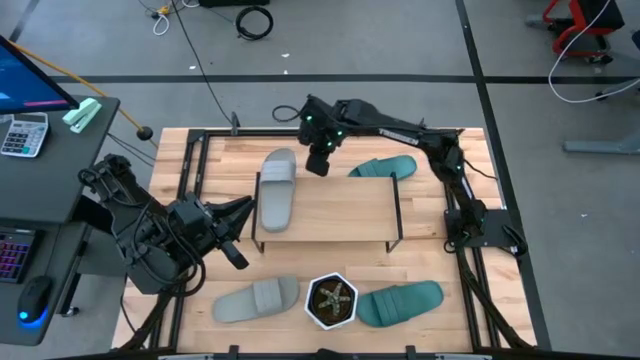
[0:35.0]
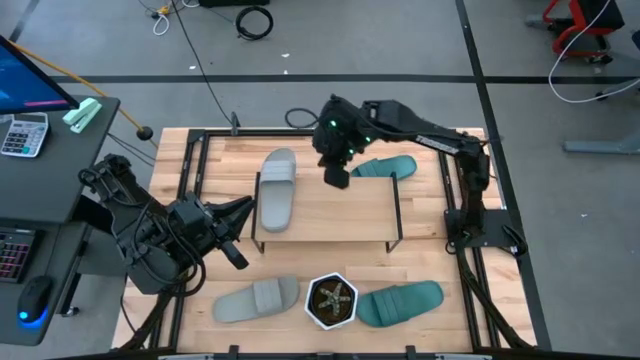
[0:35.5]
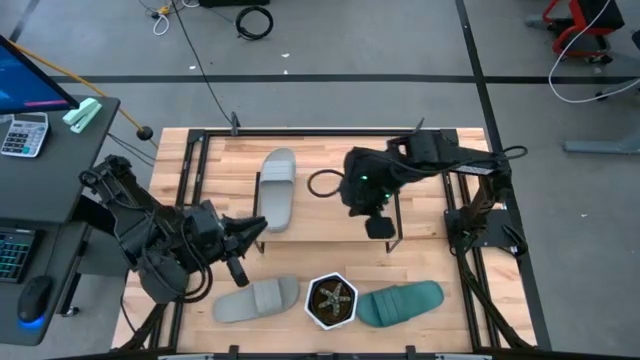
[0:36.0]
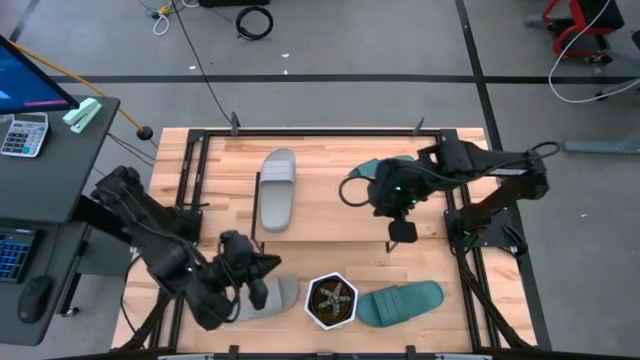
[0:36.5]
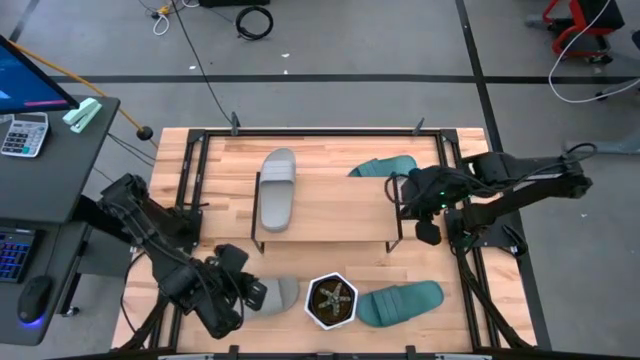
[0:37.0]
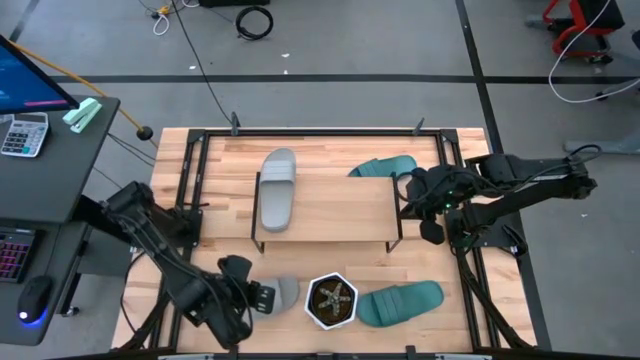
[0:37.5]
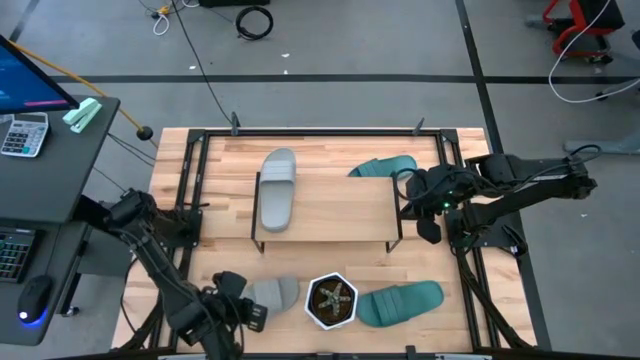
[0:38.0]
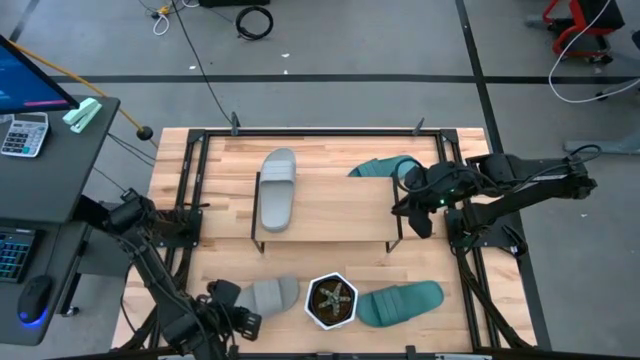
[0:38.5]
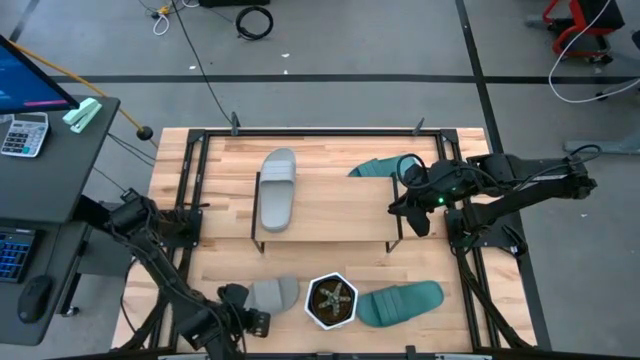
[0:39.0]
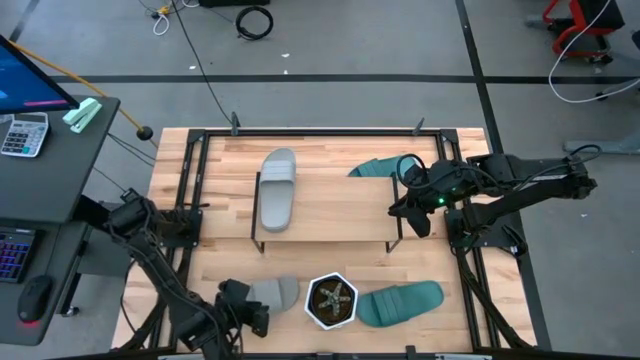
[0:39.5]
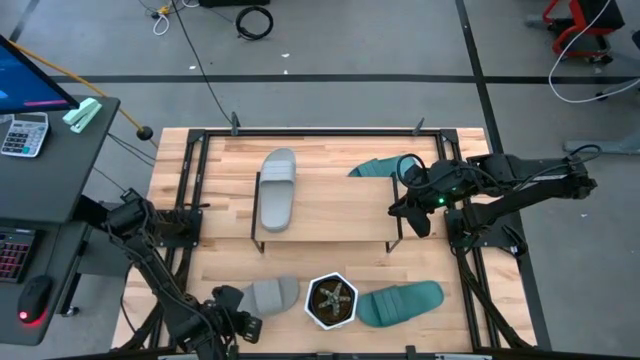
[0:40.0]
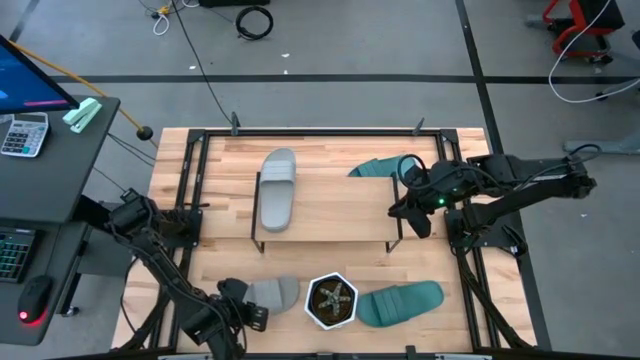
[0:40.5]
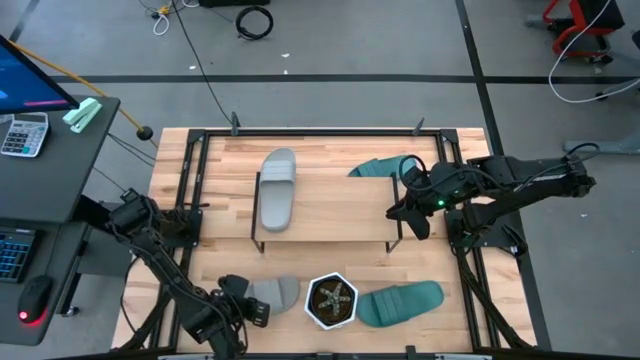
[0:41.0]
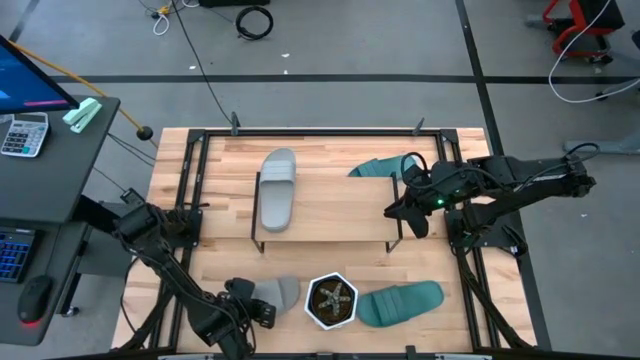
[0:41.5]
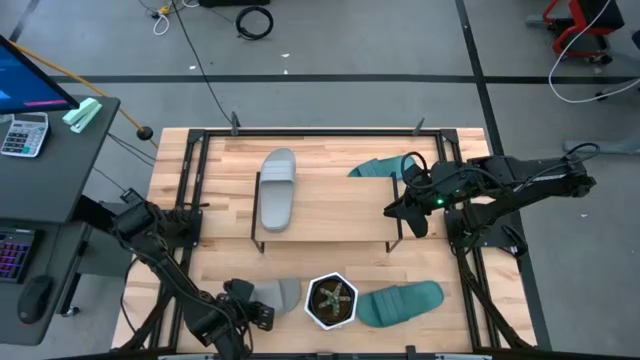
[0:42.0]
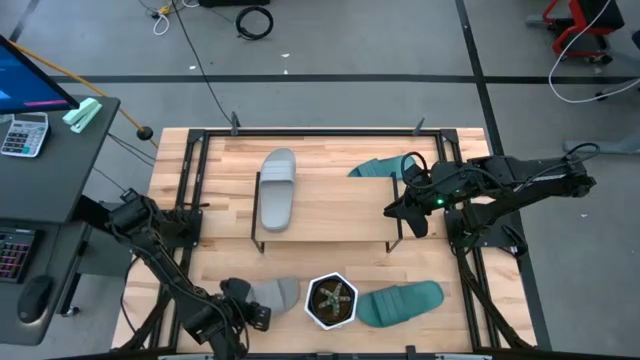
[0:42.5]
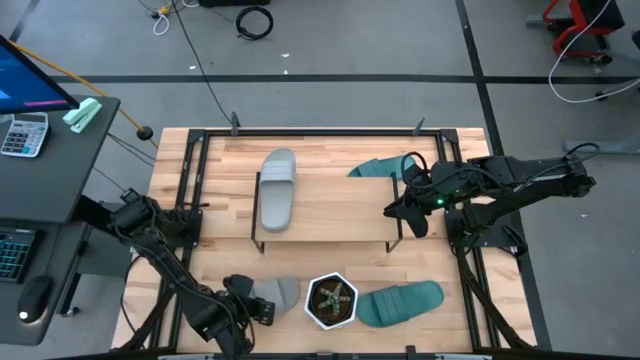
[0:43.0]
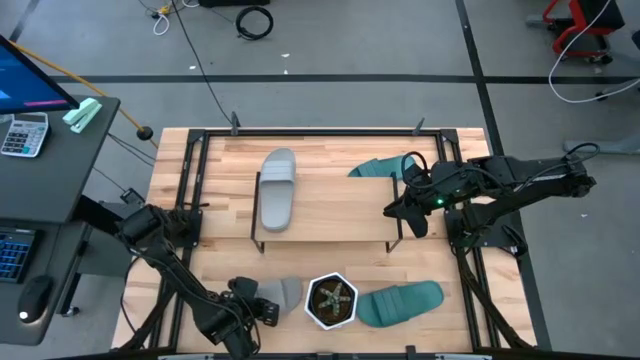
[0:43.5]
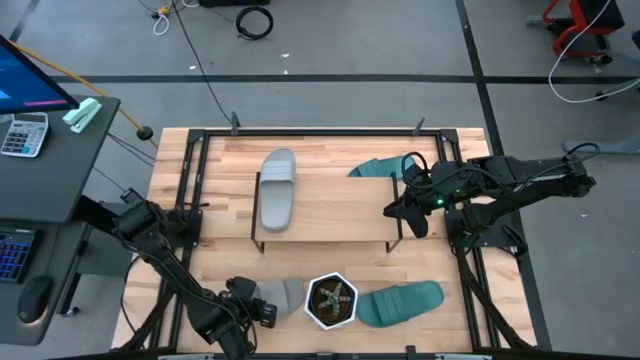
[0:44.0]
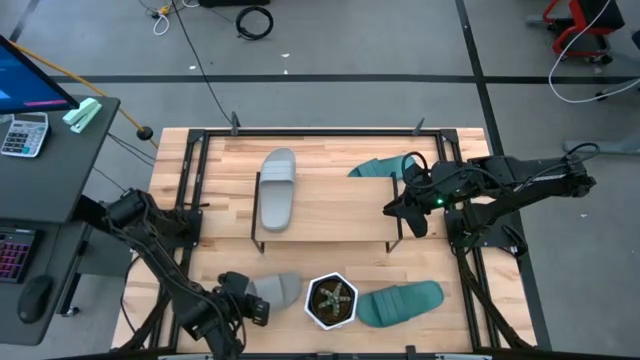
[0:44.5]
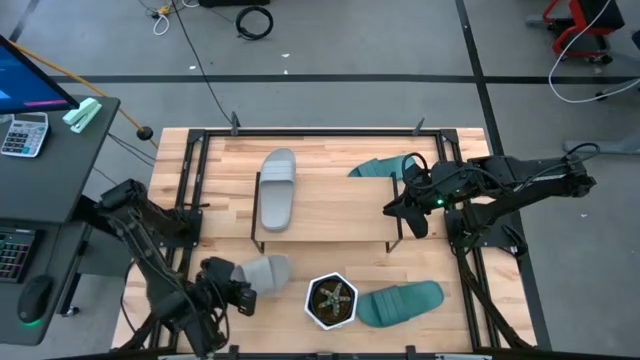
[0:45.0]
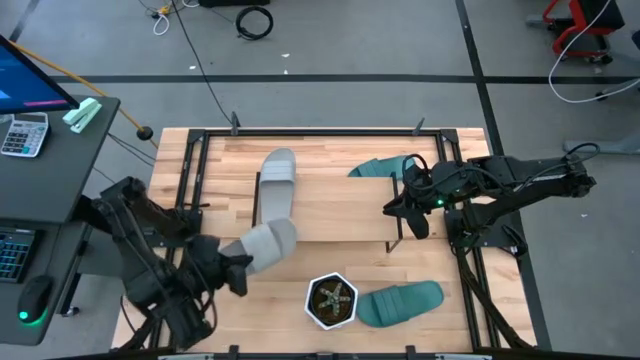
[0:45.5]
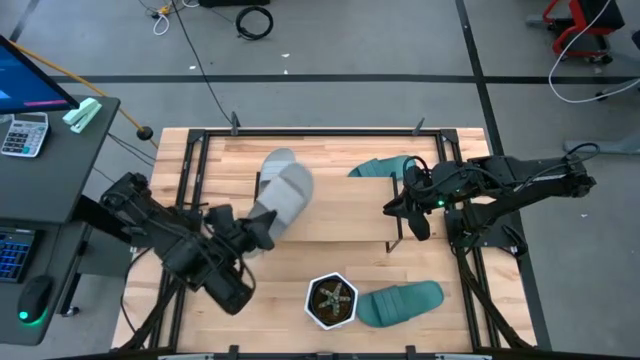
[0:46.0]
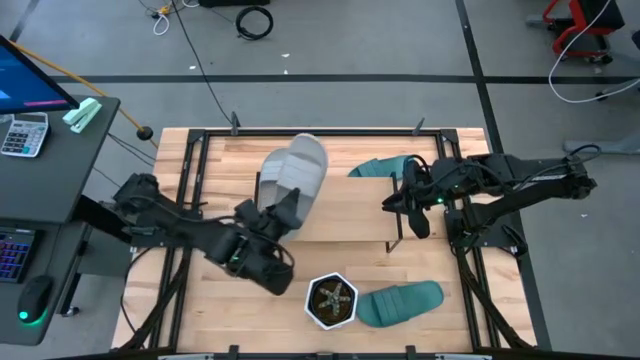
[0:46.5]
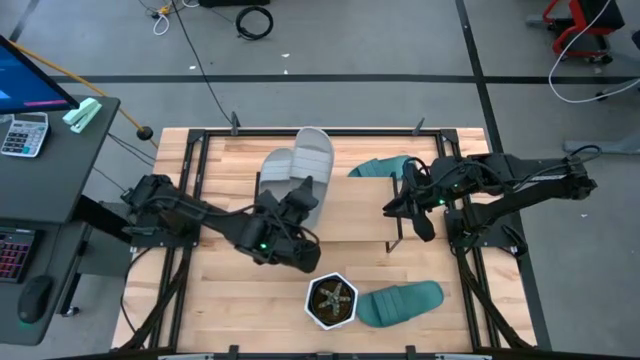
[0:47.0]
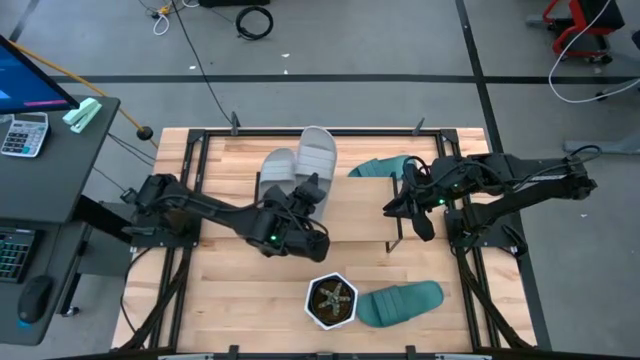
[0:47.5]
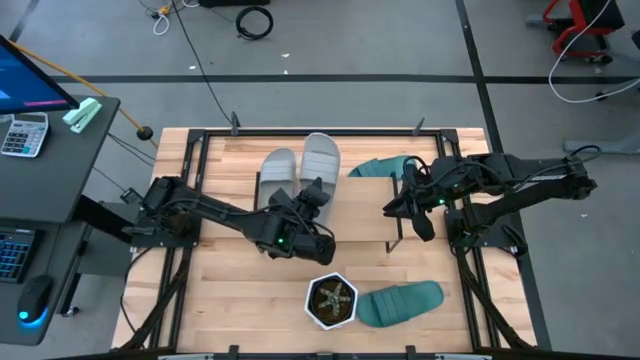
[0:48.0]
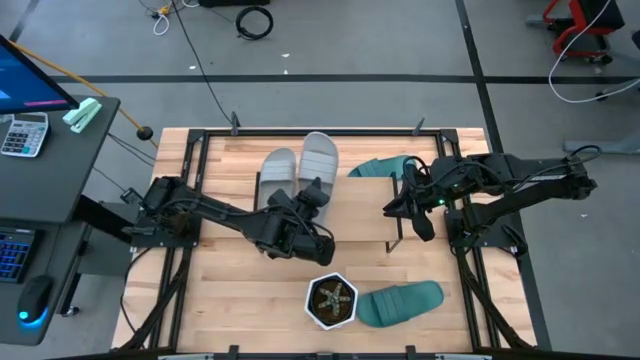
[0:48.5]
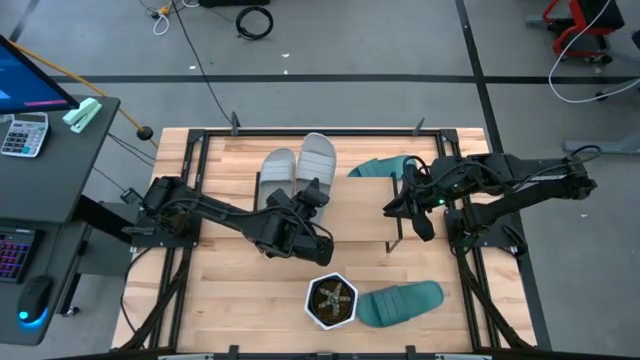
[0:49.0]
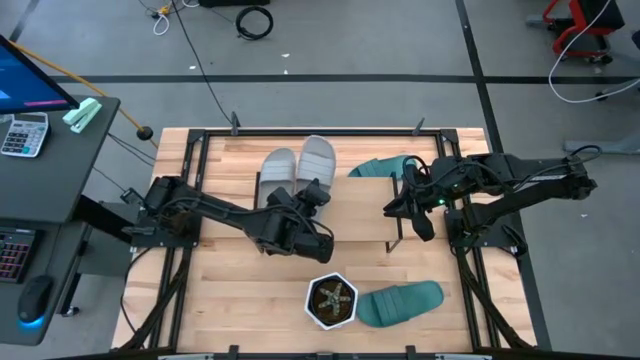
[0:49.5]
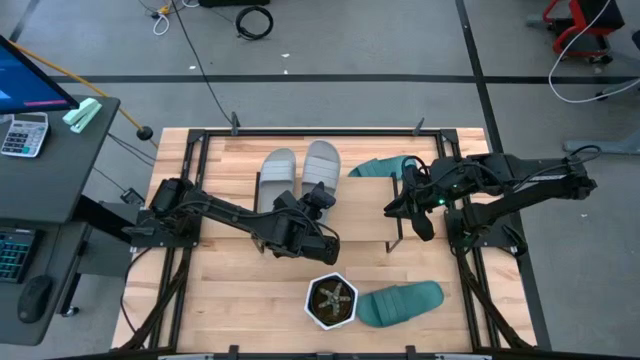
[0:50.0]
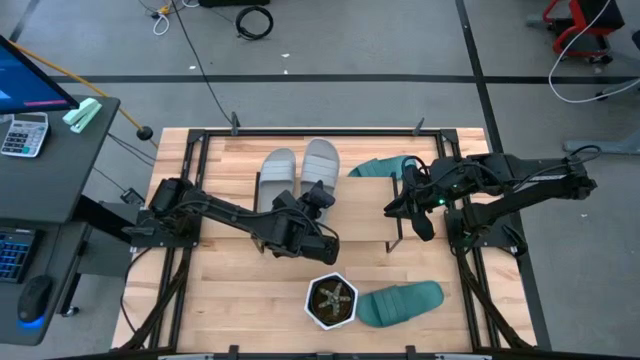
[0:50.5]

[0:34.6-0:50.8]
Task: Pick and place slides into the shelf
Put the gray slide on the shelf aligned with the other gray slide

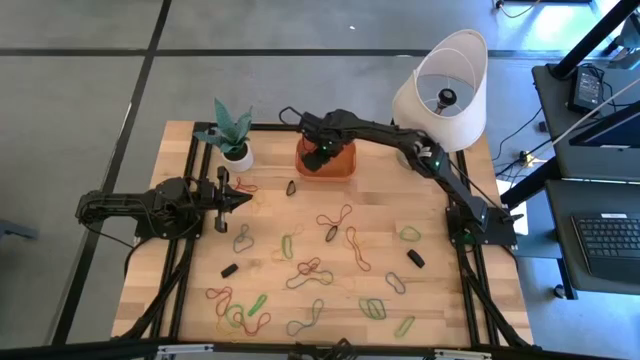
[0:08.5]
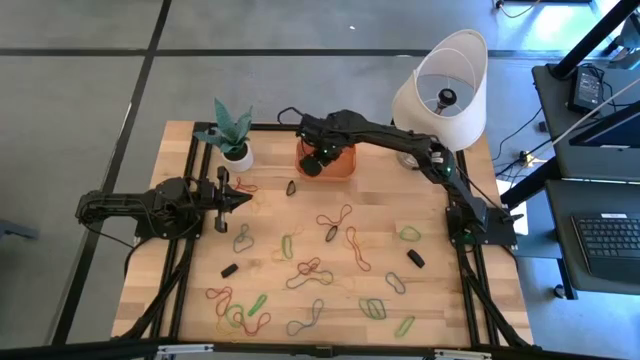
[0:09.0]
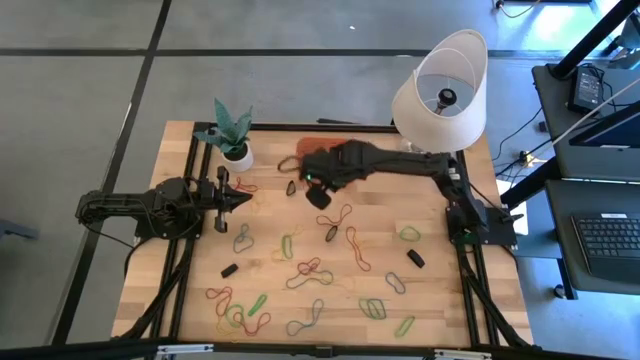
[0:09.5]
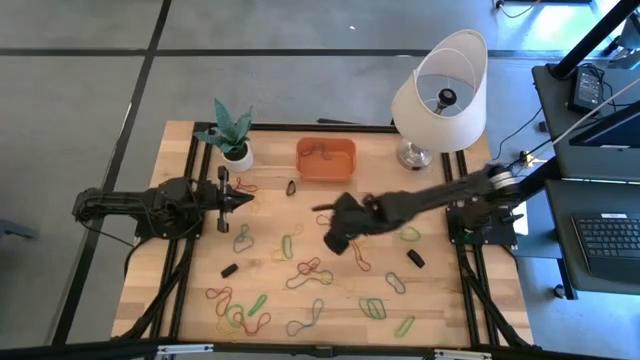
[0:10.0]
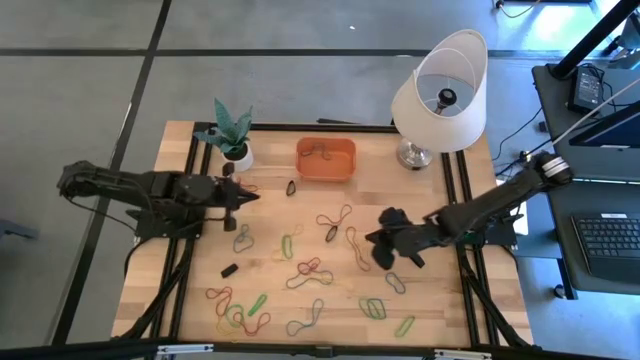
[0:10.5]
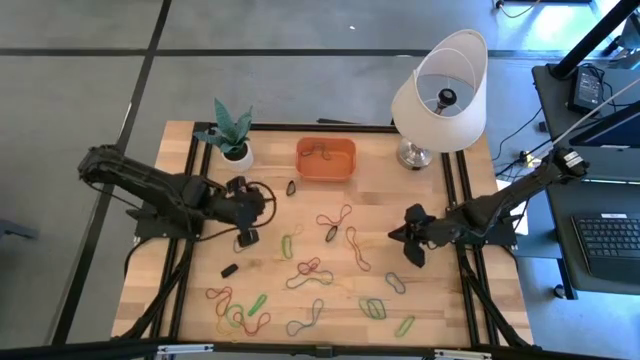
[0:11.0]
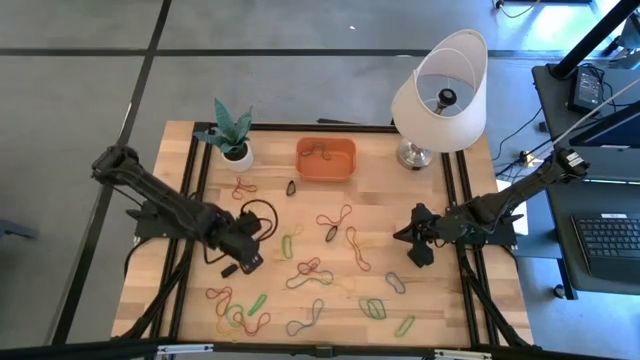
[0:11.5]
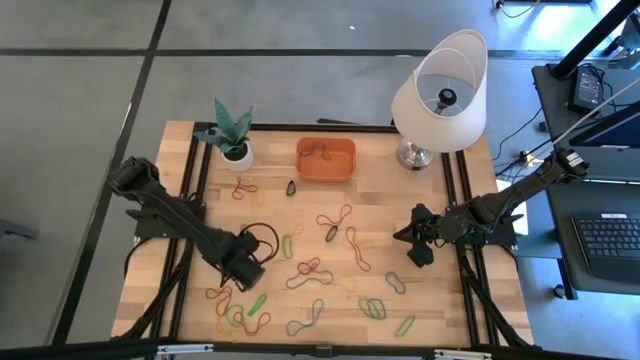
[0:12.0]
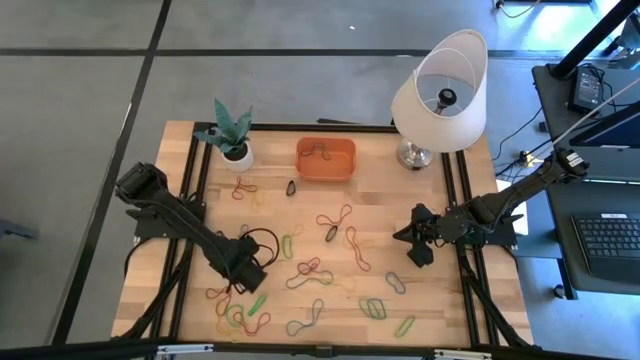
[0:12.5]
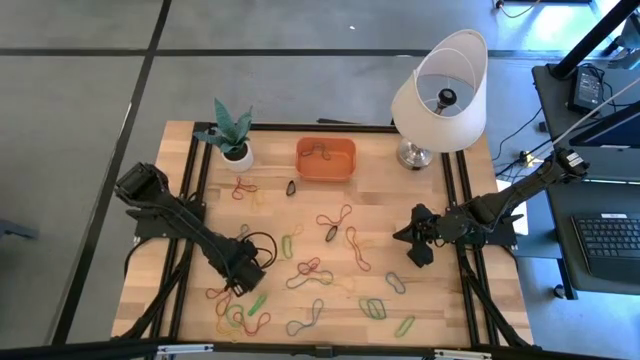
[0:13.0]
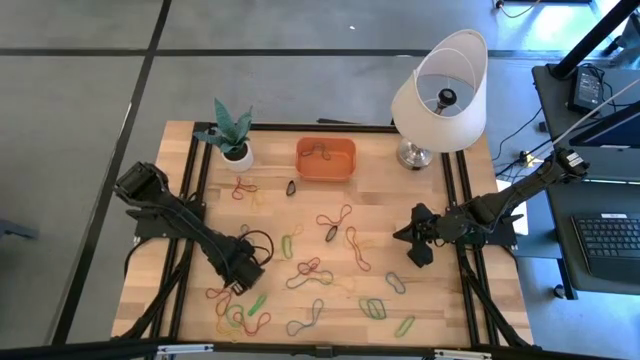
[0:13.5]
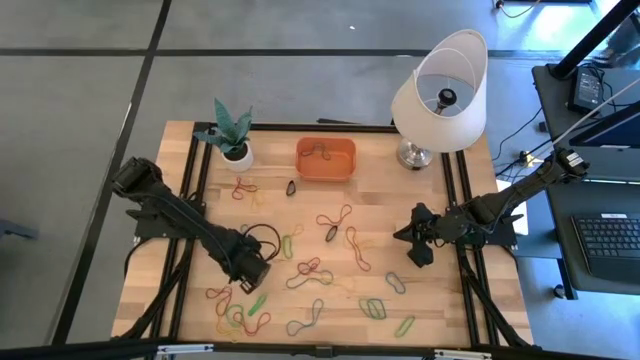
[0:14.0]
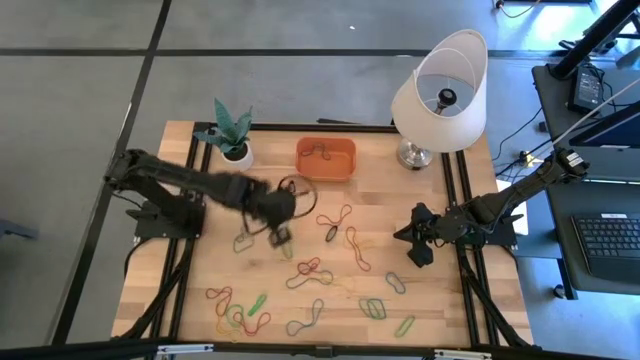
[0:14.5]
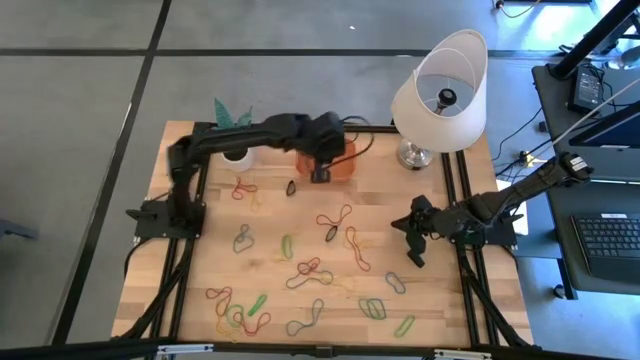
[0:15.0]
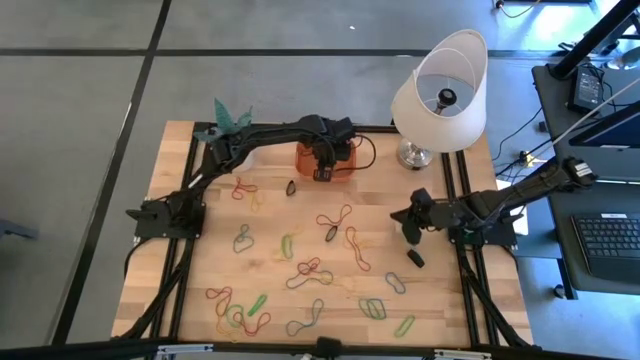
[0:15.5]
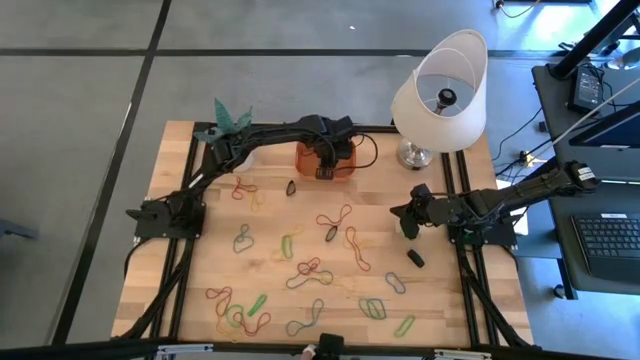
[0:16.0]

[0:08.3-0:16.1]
Task: Pick and place rubber bands into bin
Put the black rubber band into the bin
